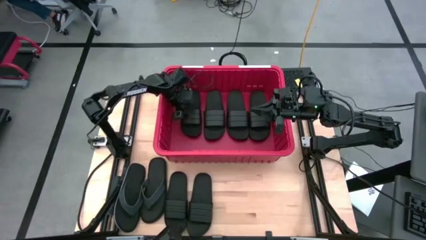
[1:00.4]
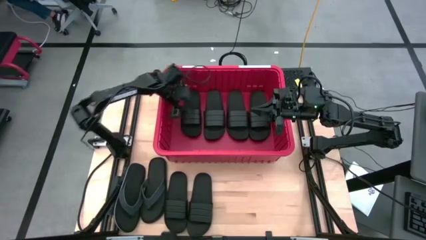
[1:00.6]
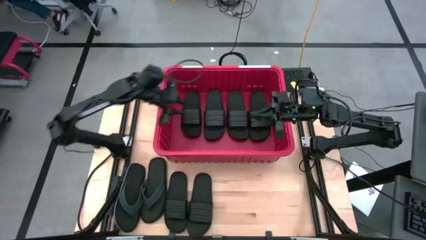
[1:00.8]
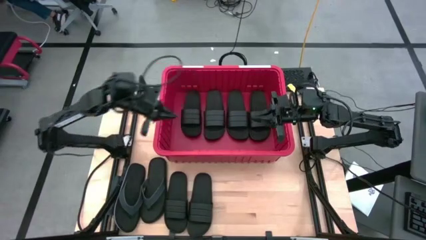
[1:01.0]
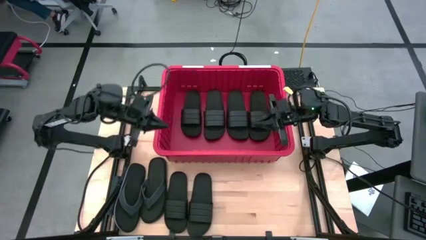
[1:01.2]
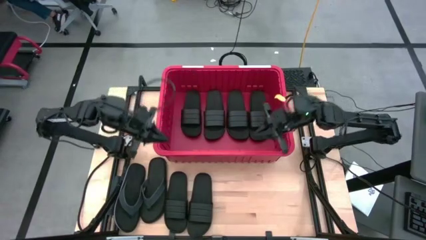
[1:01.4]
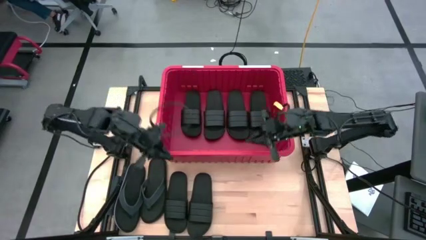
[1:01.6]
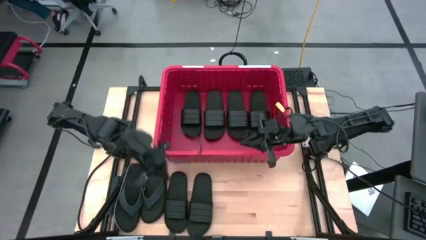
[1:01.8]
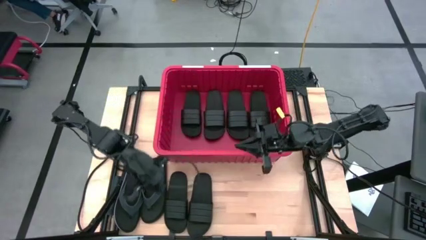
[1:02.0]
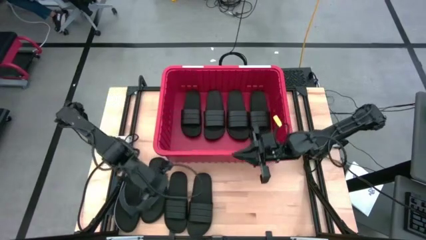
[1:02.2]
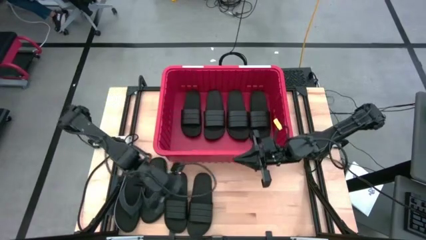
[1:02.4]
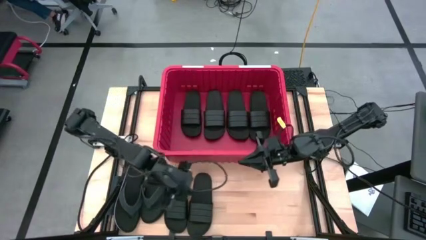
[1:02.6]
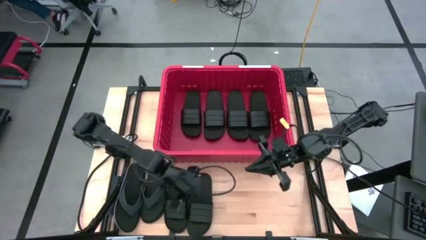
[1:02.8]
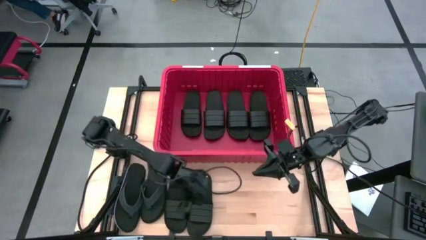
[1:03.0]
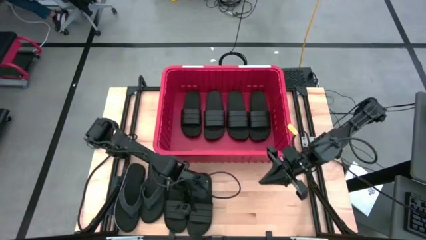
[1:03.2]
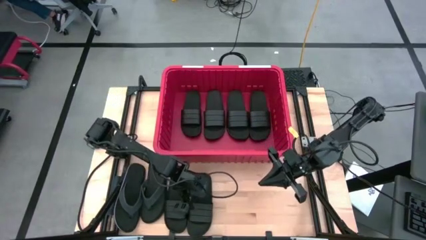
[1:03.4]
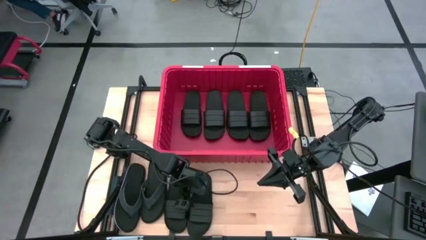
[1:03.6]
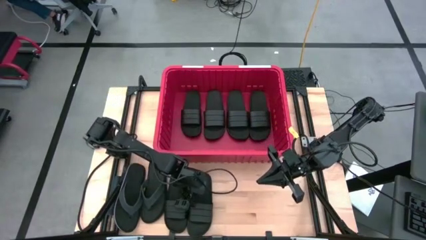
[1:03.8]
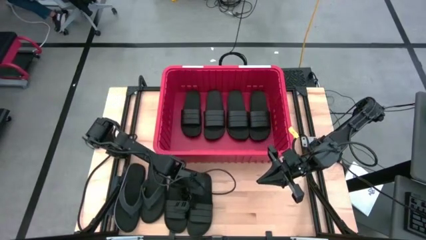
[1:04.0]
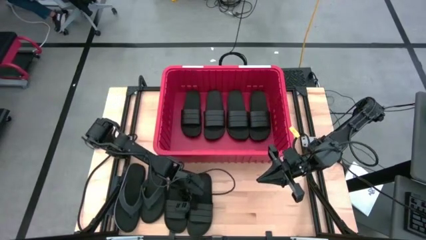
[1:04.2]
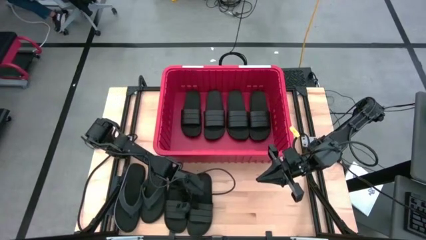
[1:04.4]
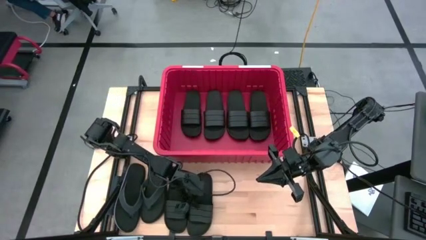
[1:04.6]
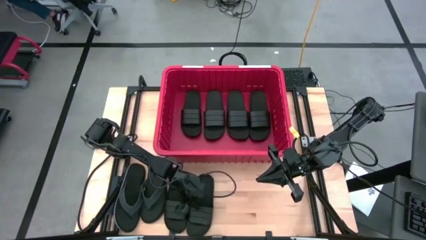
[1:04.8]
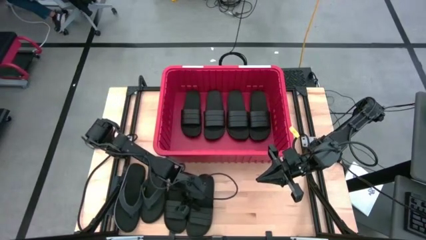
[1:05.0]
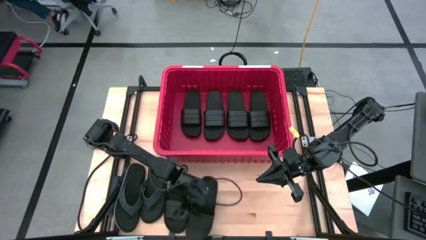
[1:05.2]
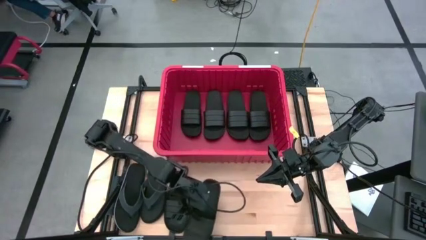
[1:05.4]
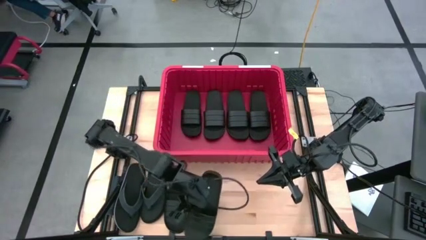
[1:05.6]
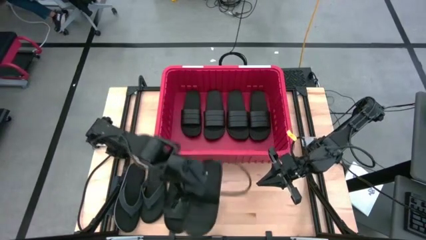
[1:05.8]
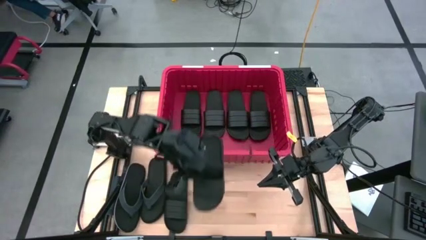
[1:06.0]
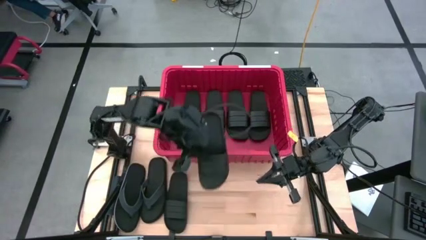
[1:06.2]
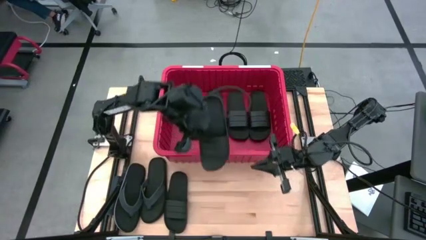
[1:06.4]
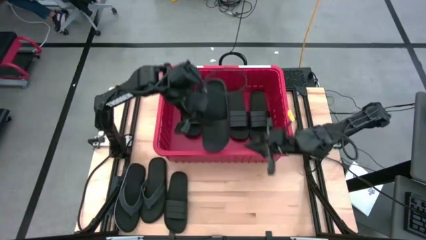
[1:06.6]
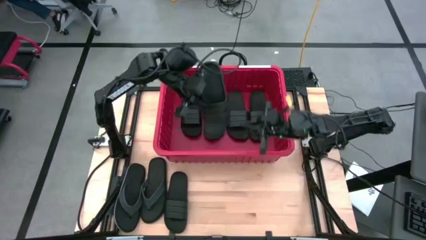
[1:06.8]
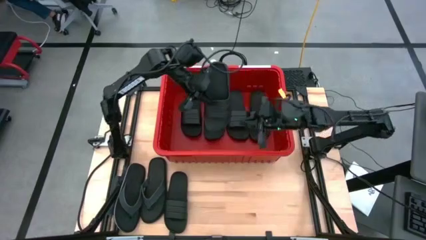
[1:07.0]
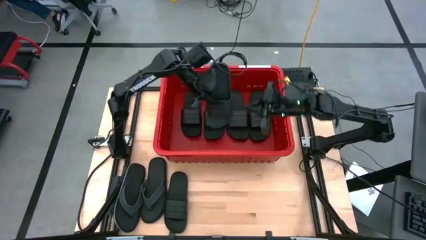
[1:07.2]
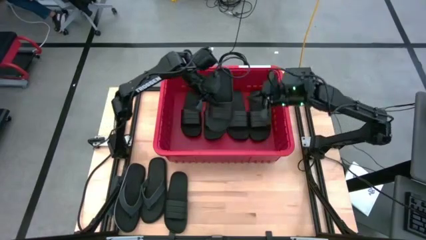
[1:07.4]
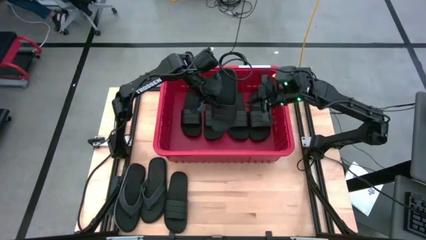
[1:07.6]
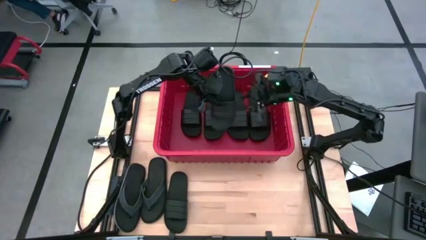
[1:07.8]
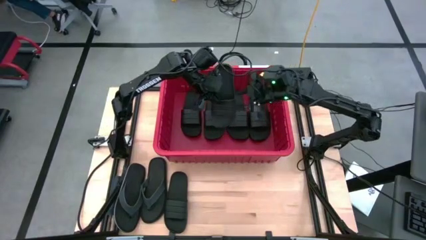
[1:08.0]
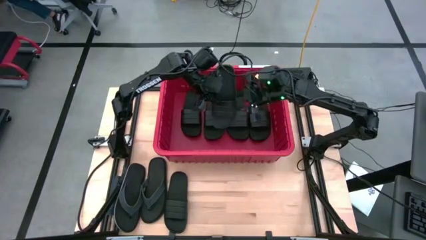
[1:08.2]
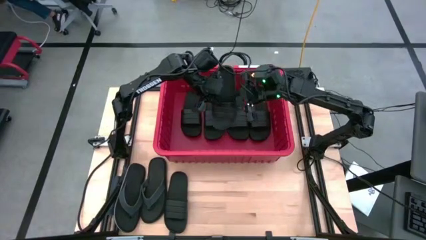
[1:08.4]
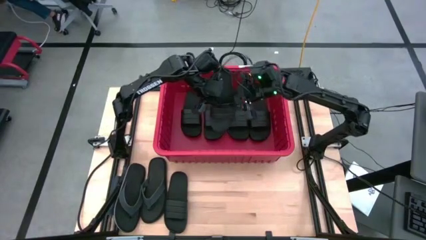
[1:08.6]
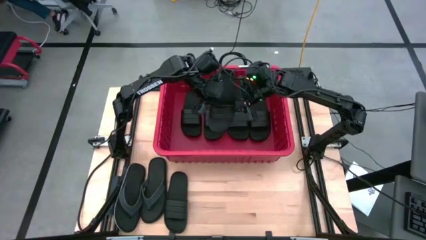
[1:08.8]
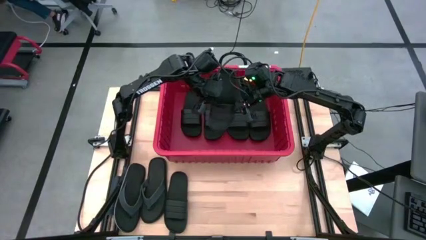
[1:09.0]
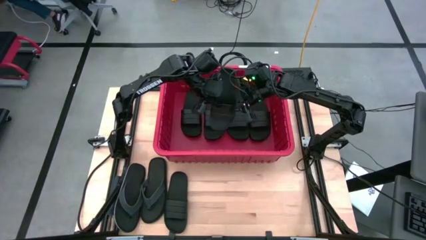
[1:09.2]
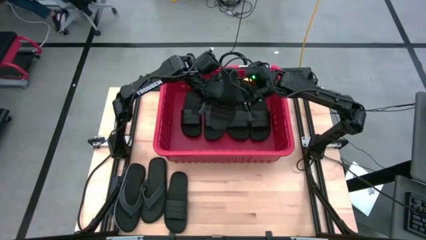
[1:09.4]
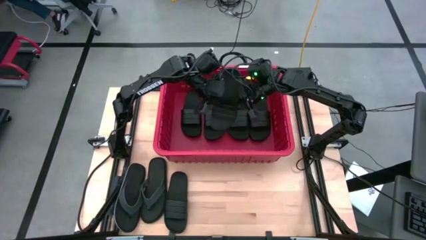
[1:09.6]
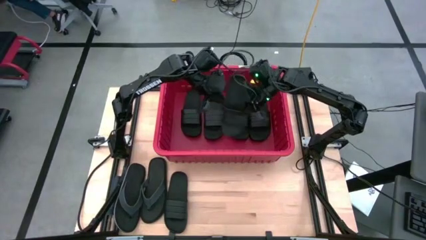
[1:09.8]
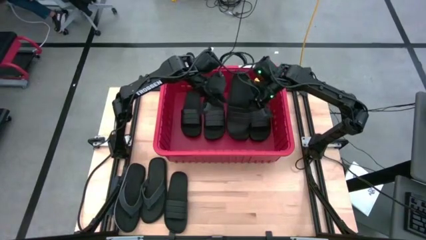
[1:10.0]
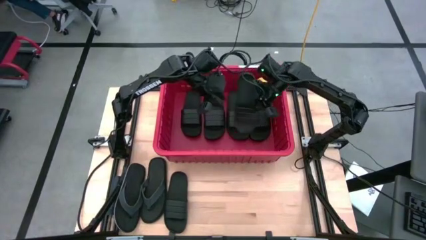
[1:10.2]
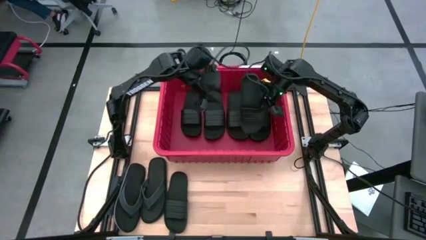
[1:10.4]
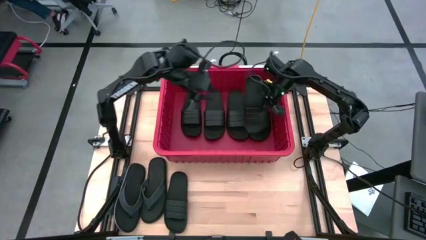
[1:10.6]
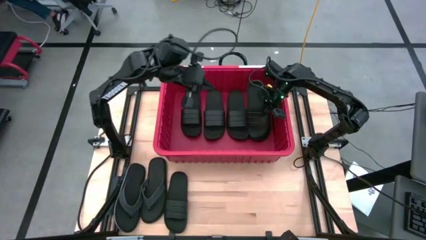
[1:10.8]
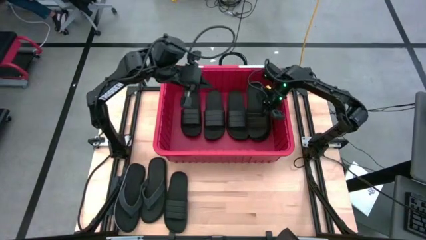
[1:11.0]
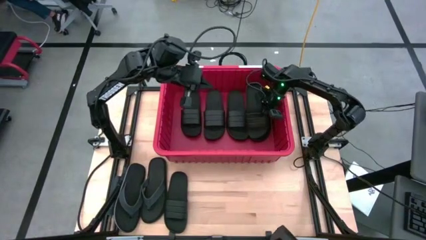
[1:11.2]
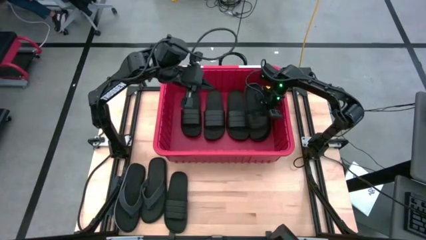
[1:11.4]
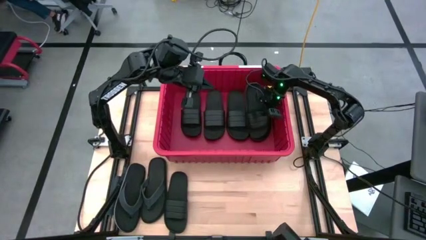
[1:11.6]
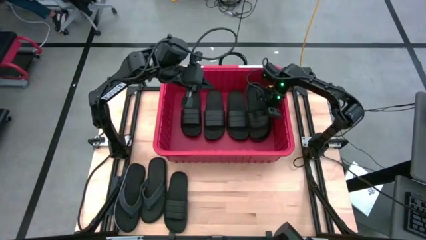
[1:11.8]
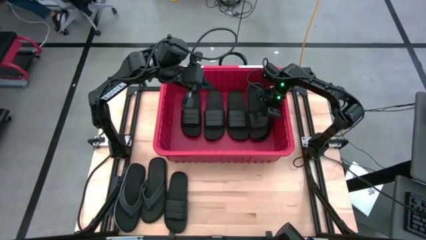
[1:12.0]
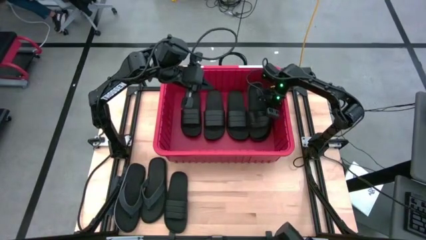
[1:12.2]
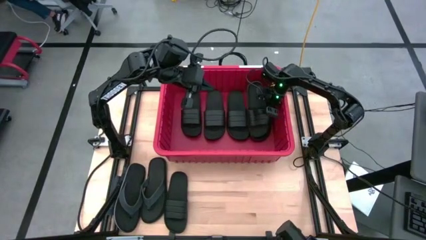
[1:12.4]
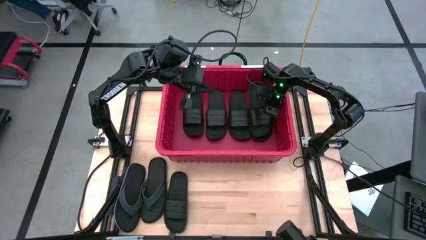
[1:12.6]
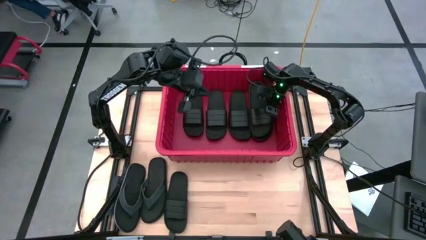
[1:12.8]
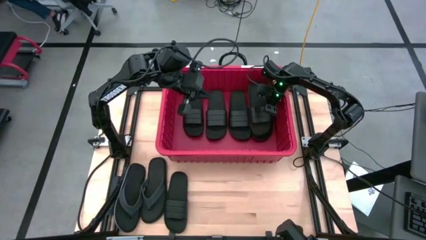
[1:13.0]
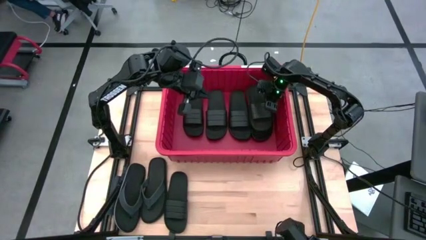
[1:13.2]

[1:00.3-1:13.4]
Task: Pick and place slides into bin
Put the black slide into the red bin
